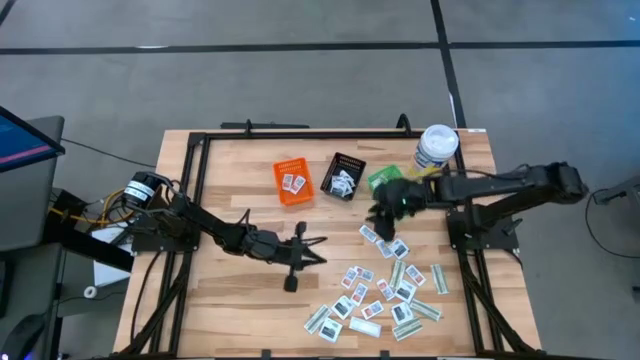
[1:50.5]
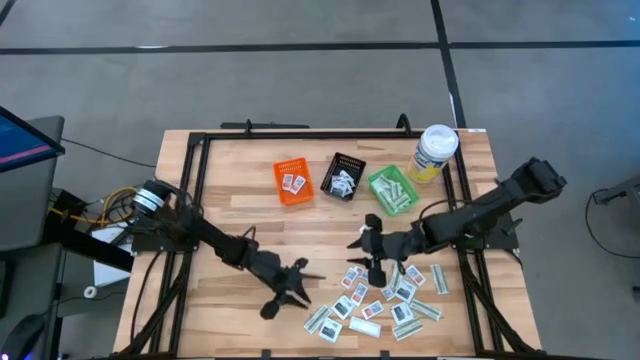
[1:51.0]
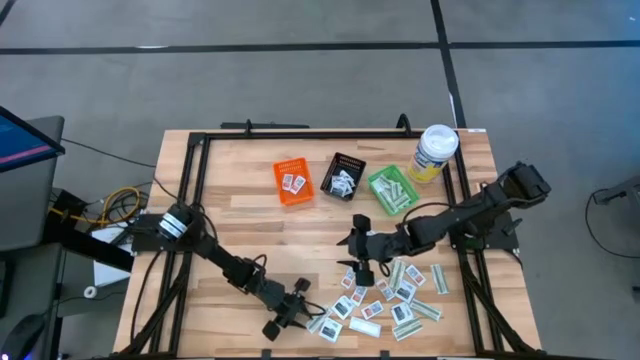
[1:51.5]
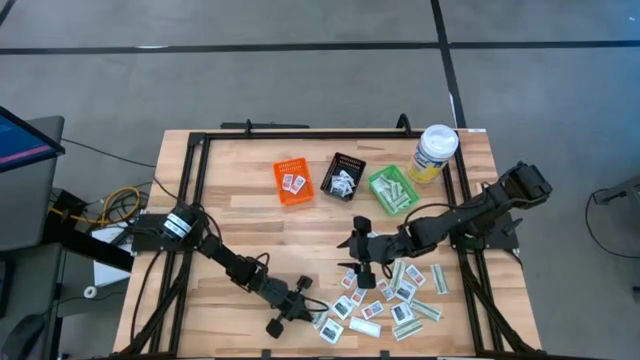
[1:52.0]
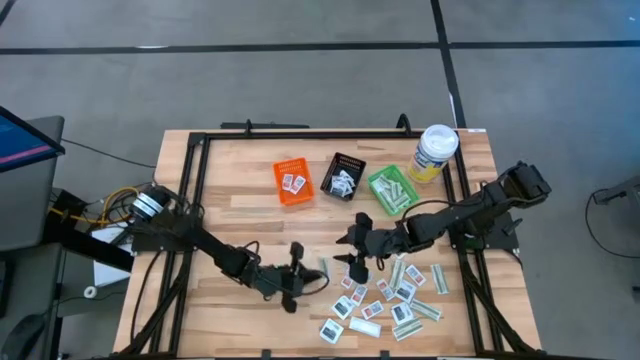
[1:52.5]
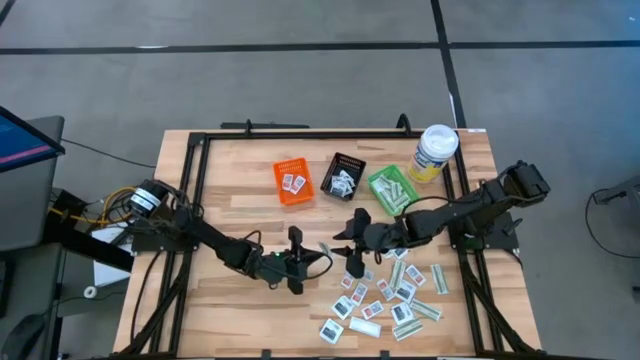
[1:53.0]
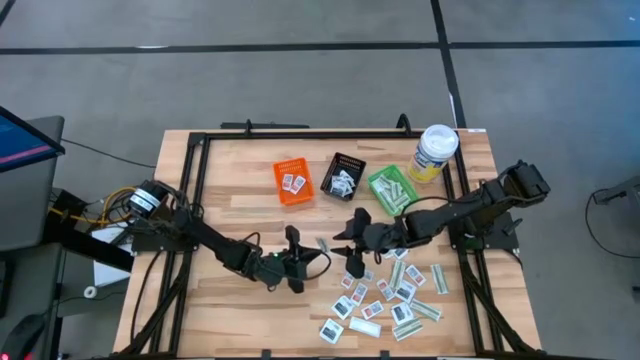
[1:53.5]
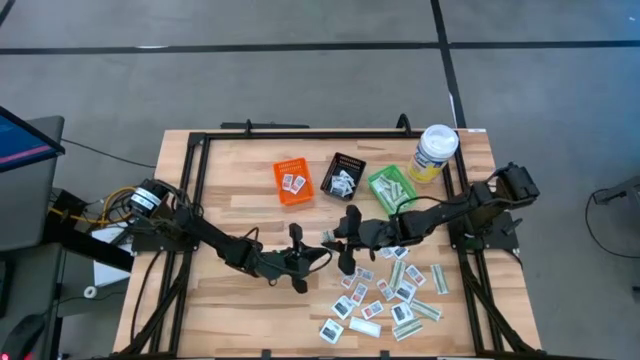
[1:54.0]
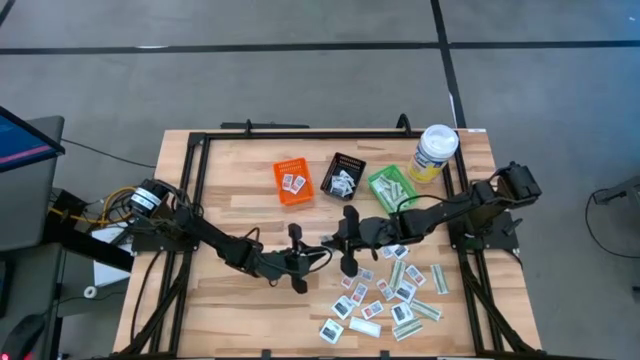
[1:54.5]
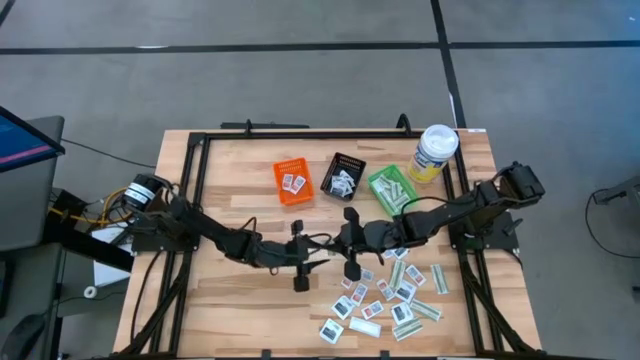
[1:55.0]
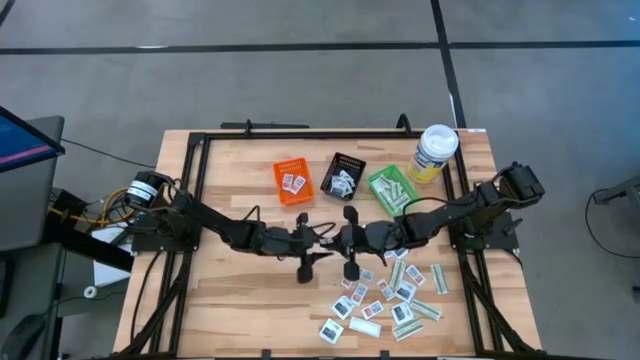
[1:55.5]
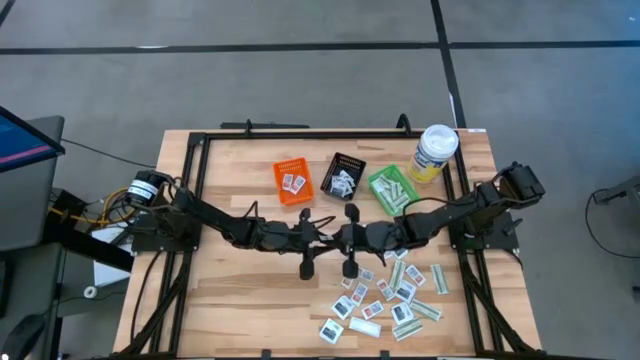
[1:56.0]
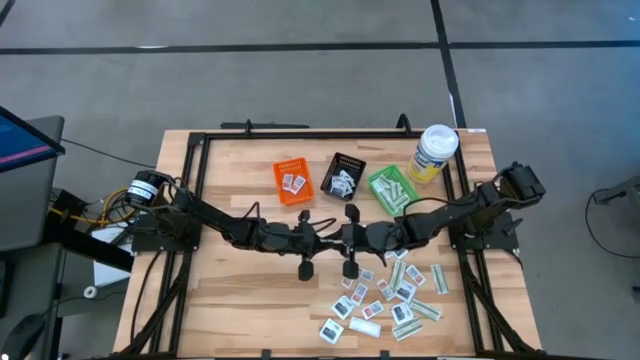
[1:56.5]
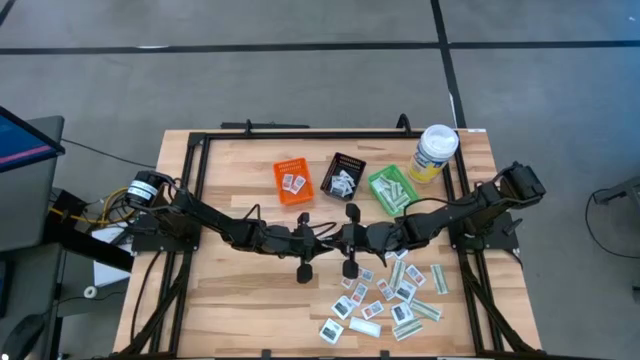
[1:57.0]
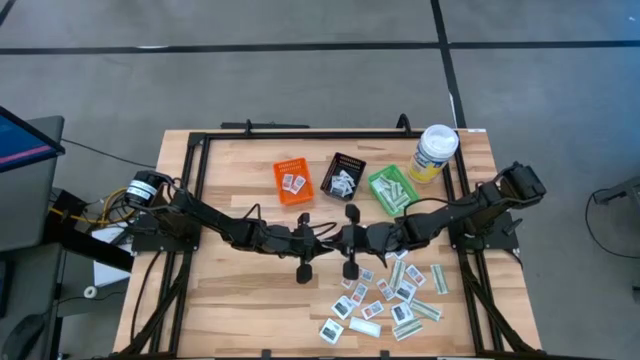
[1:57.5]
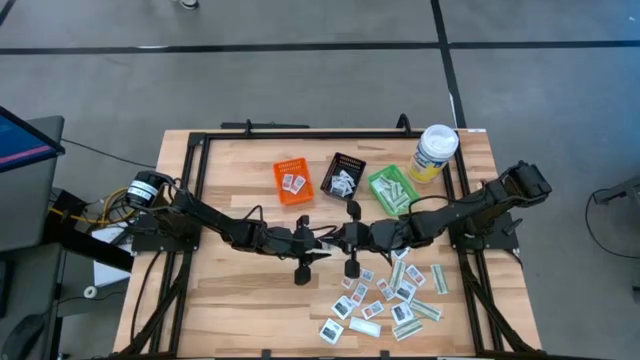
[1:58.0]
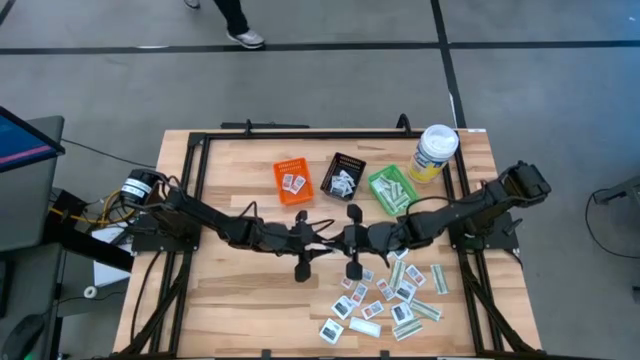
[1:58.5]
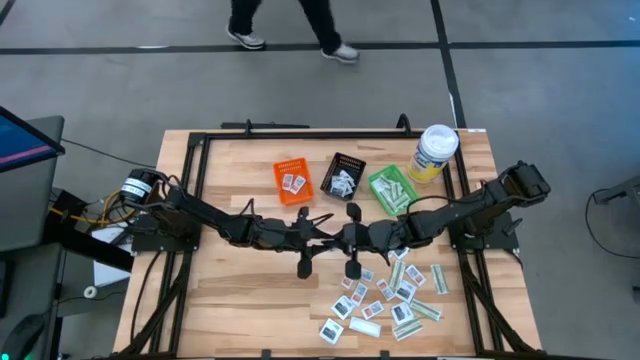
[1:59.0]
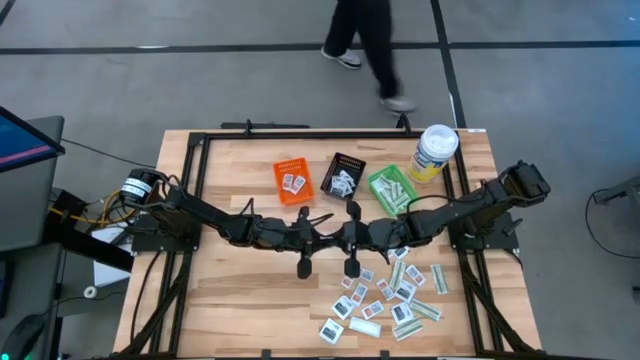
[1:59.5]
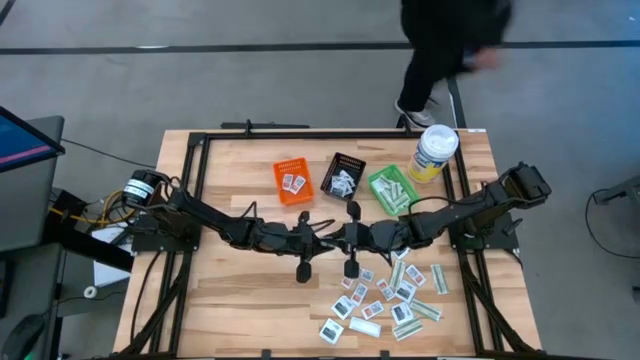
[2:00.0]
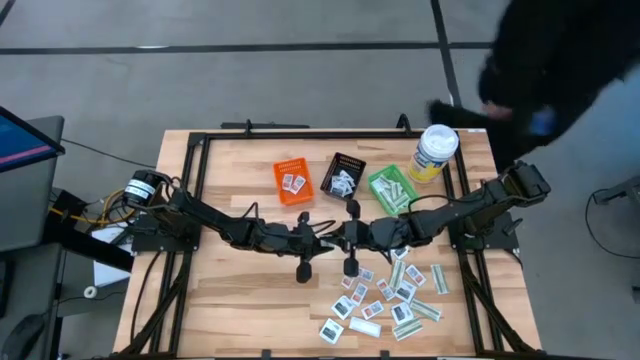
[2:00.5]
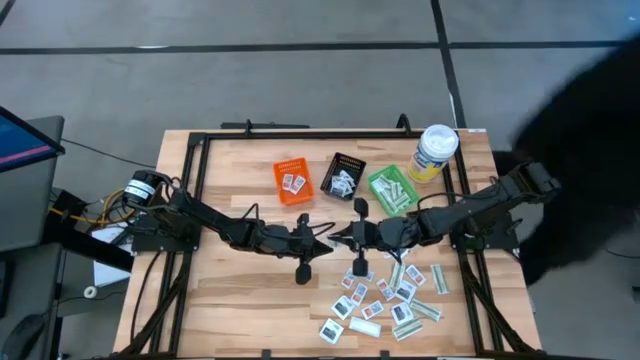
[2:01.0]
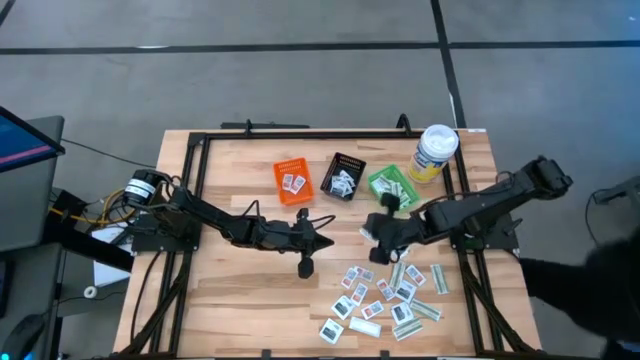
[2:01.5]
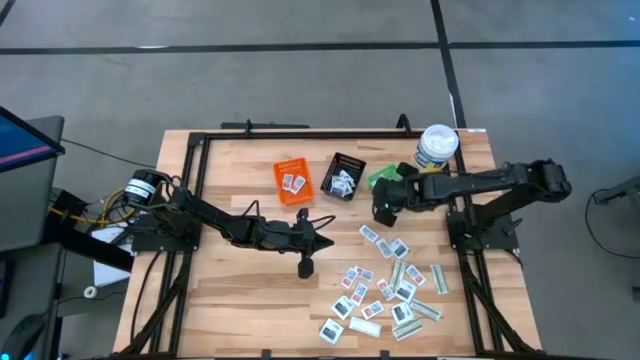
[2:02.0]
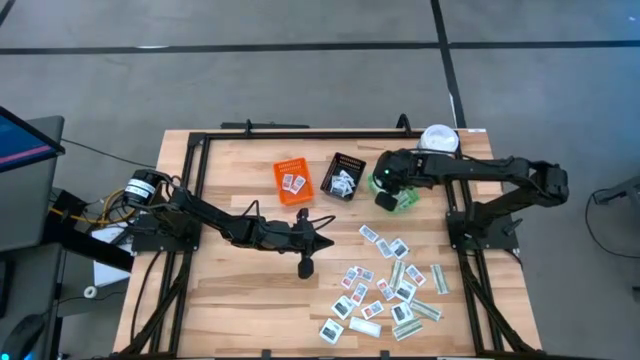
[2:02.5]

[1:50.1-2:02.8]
Task: Pick & Place First Aid Supplies
Put the green bandage pack into the green basket

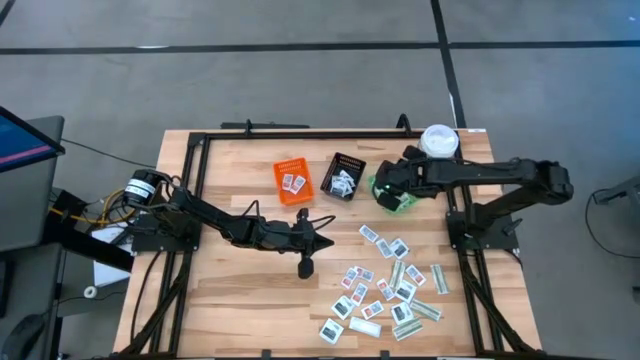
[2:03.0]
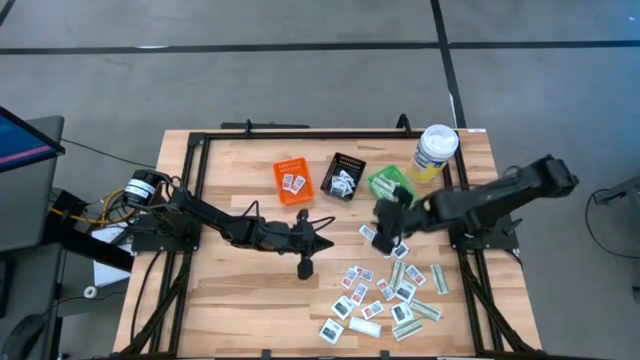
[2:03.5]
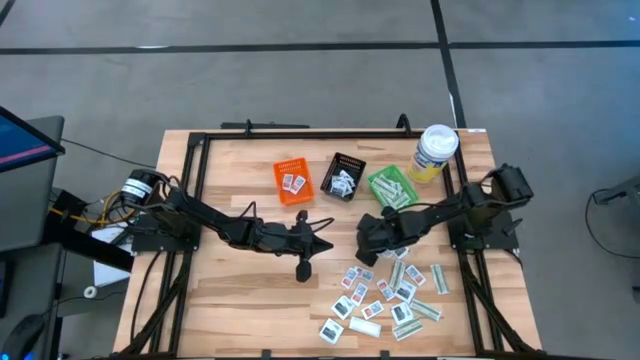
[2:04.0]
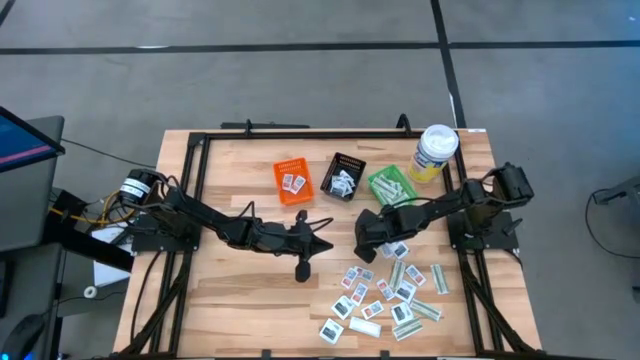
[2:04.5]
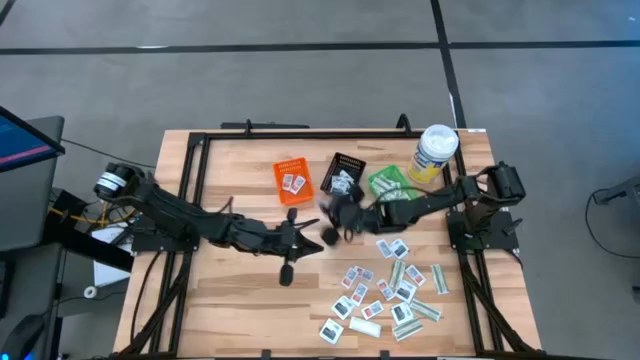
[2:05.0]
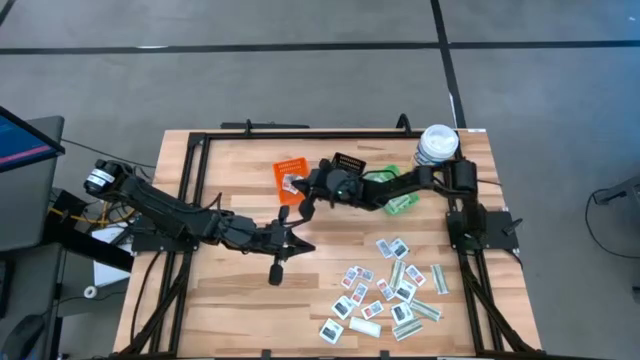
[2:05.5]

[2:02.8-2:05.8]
Put the orange ointment pack into the orange basket

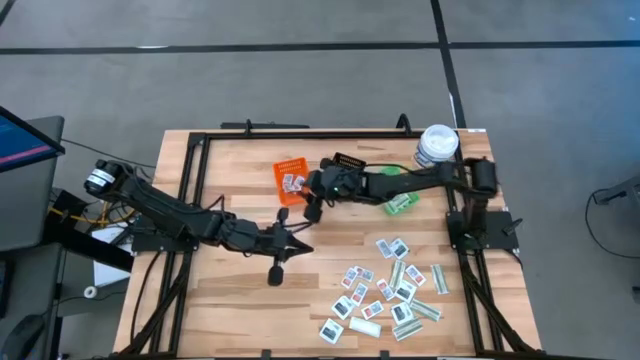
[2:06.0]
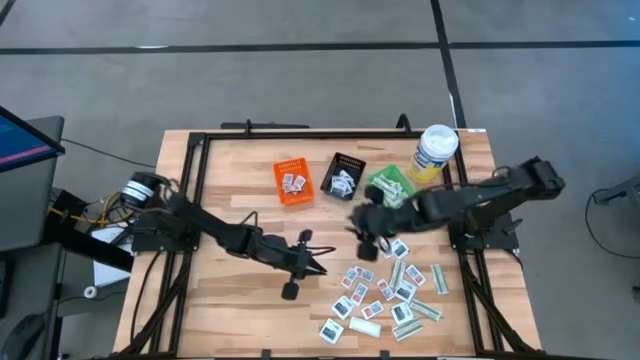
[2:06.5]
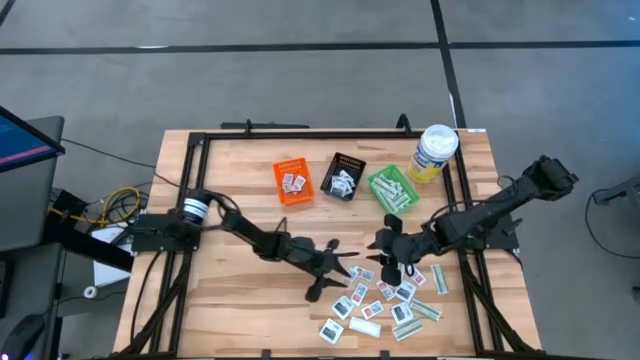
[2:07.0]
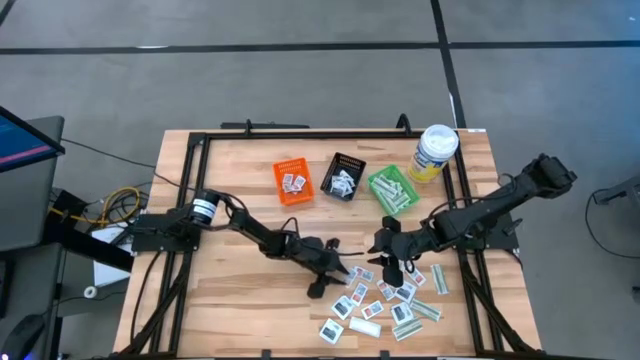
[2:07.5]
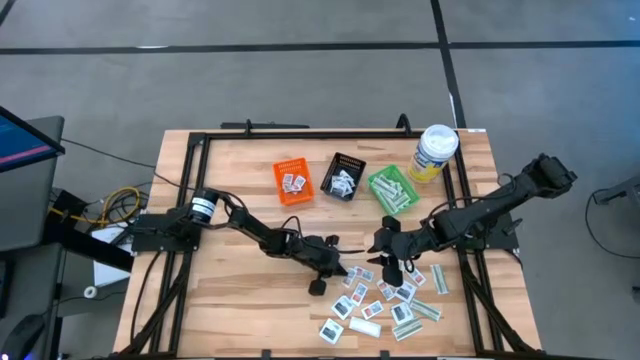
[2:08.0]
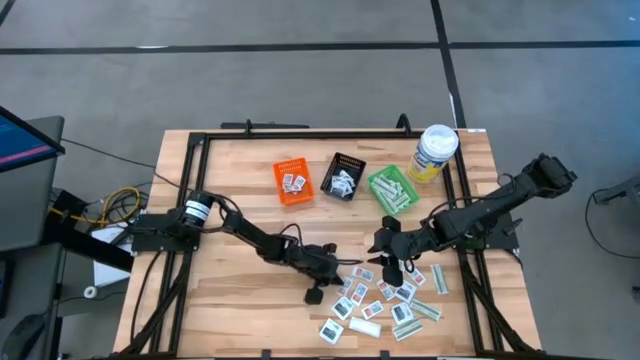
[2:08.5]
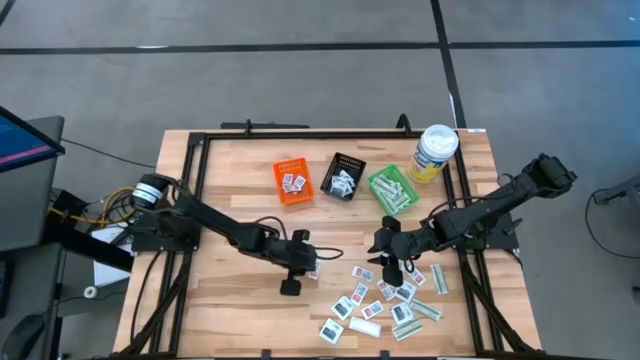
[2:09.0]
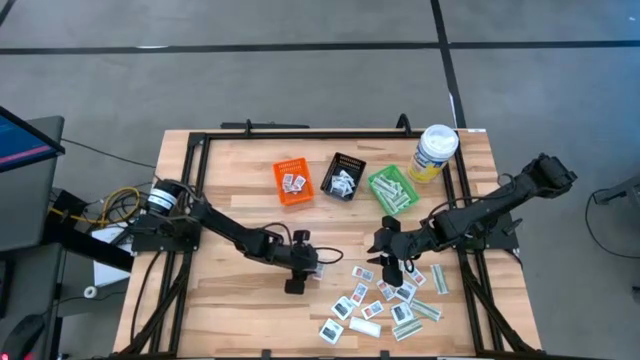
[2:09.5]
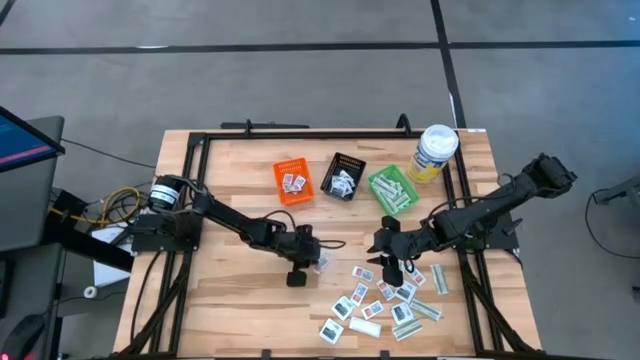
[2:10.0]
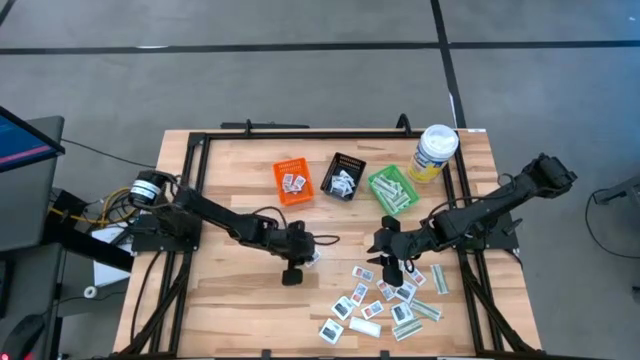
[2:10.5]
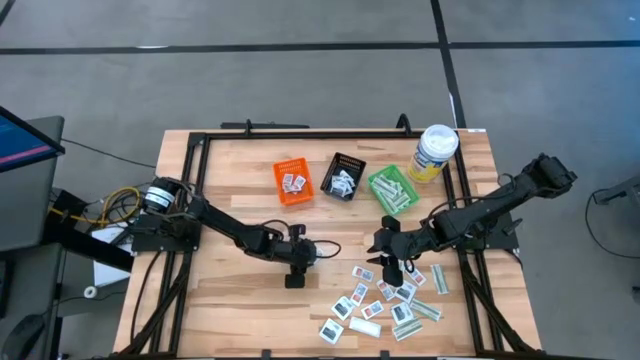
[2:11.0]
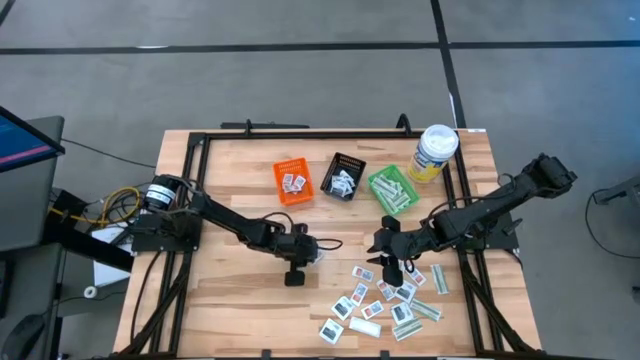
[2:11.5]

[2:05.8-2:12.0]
Put the orange ointment pack into the orange basket

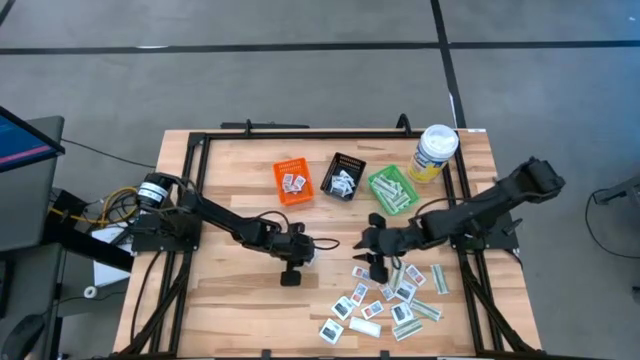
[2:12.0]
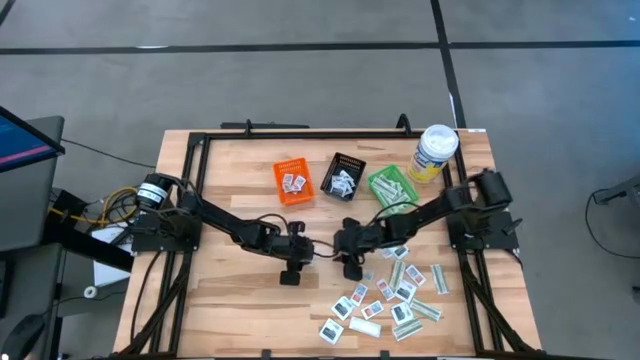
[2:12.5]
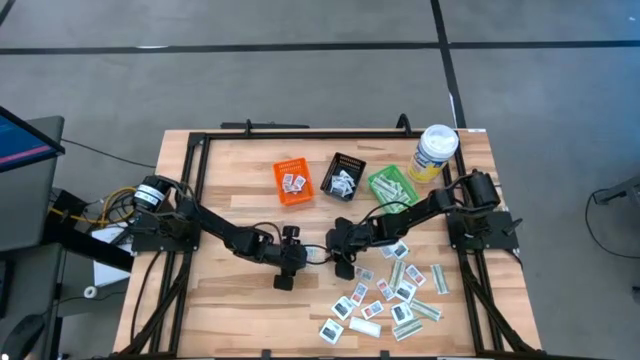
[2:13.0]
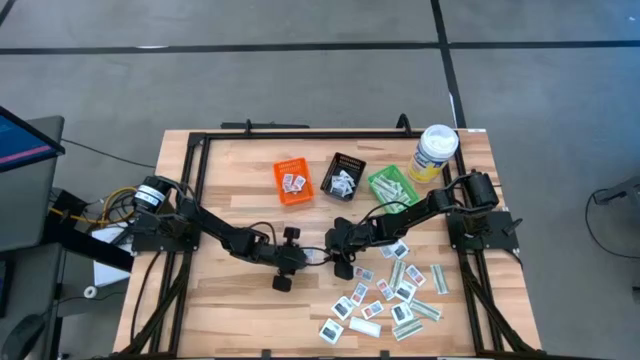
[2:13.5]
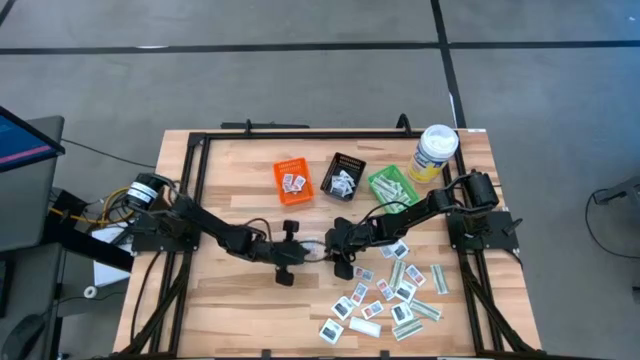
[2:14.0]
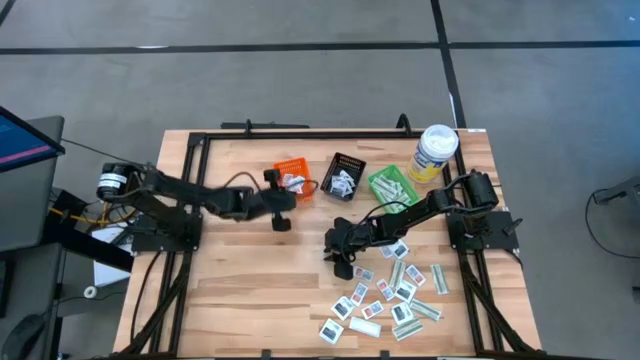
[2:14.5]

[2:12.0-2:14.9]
Put the orange ointment pack into the orange basket
